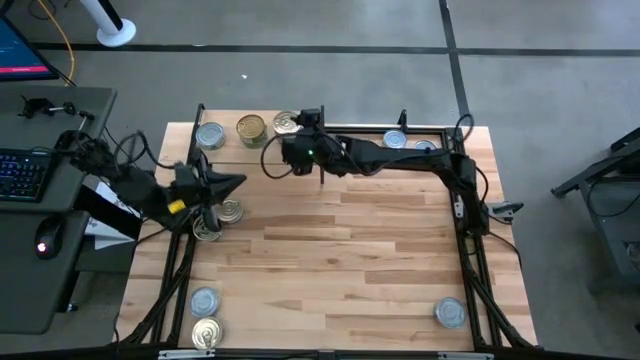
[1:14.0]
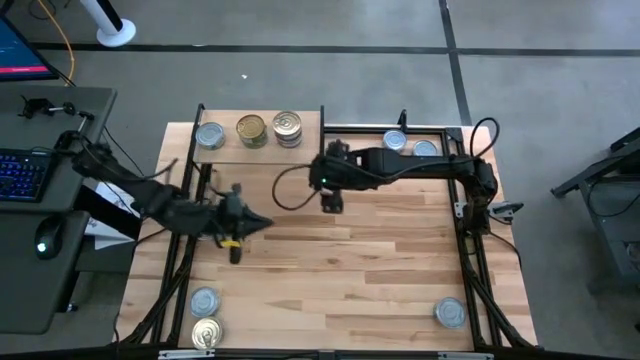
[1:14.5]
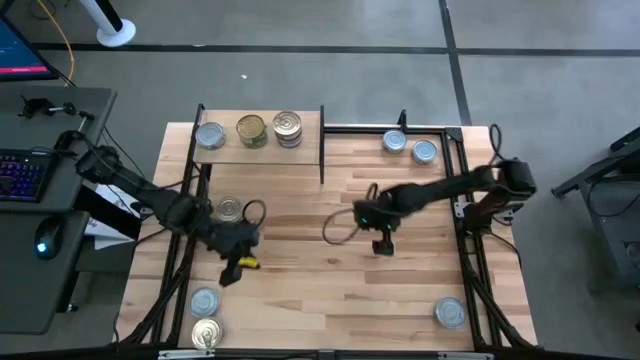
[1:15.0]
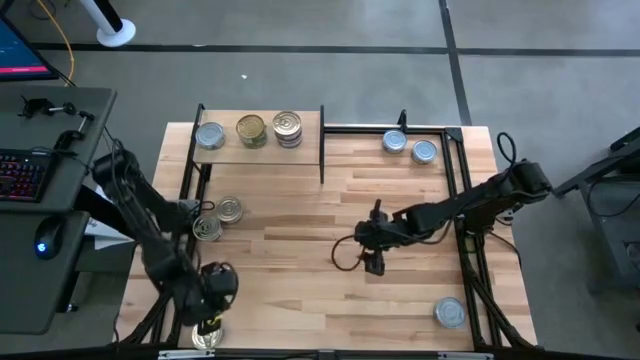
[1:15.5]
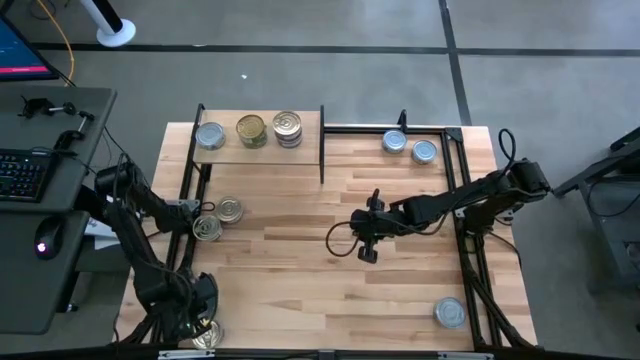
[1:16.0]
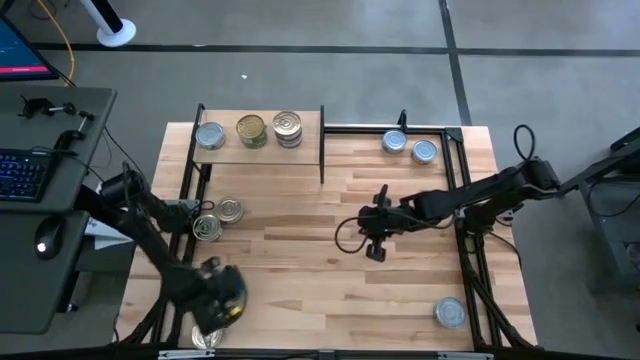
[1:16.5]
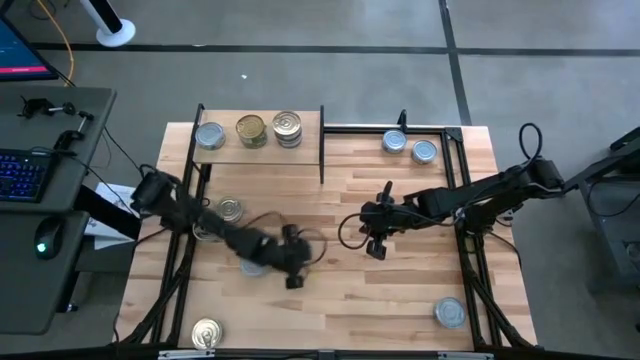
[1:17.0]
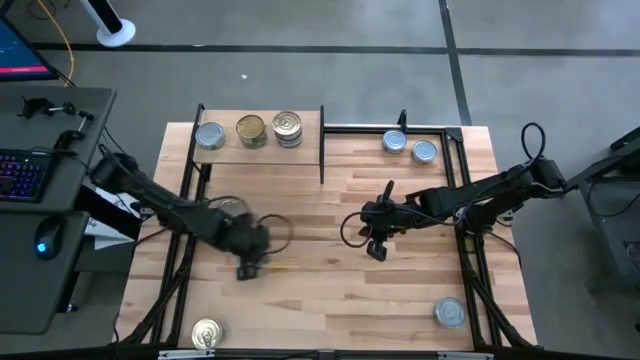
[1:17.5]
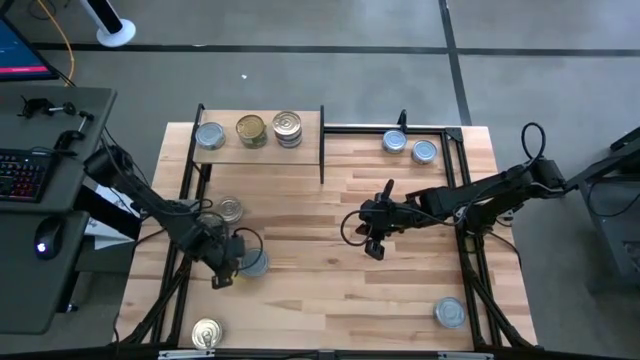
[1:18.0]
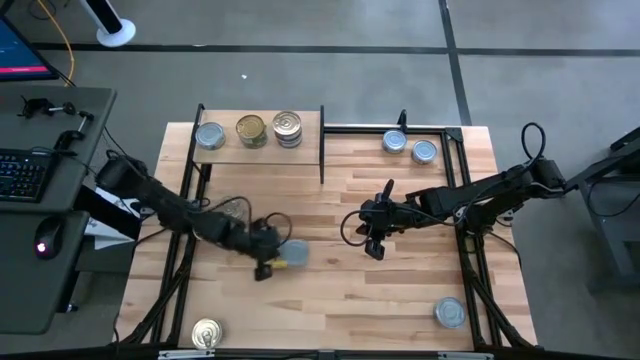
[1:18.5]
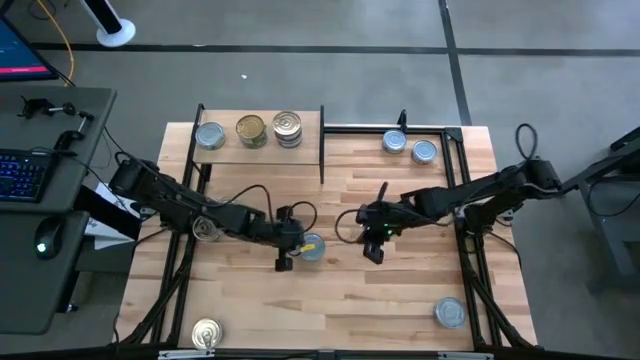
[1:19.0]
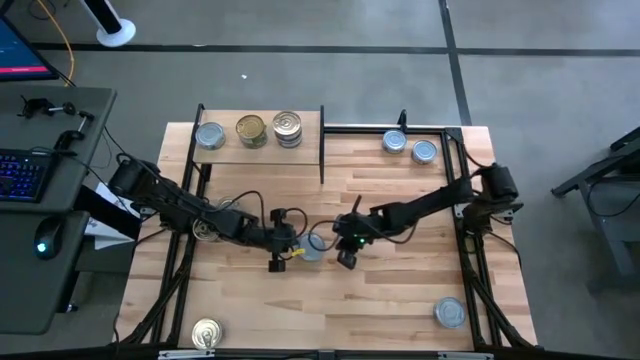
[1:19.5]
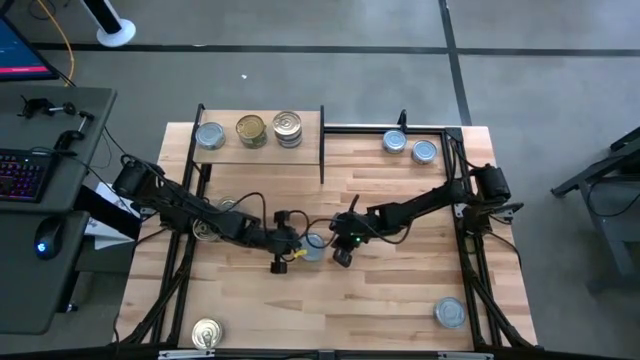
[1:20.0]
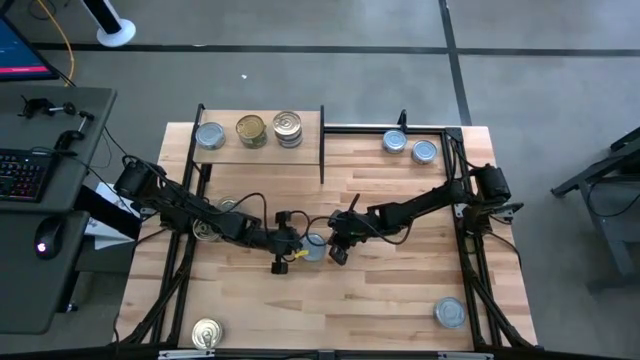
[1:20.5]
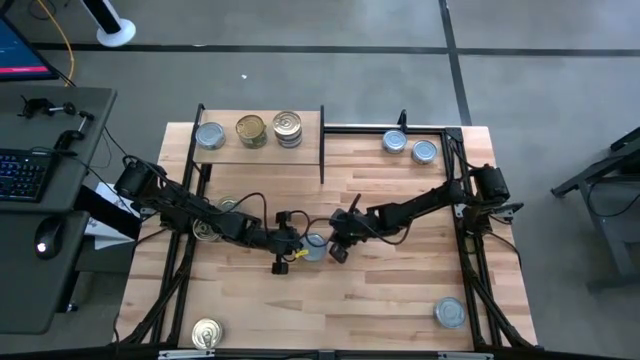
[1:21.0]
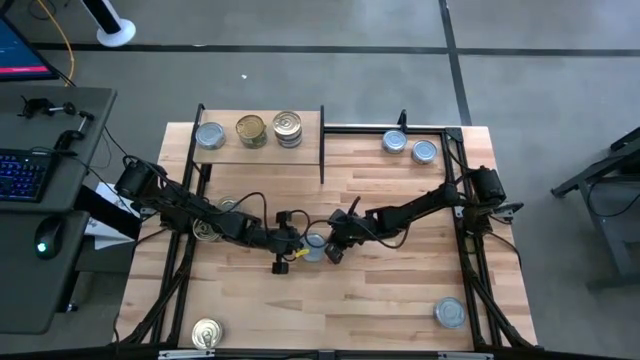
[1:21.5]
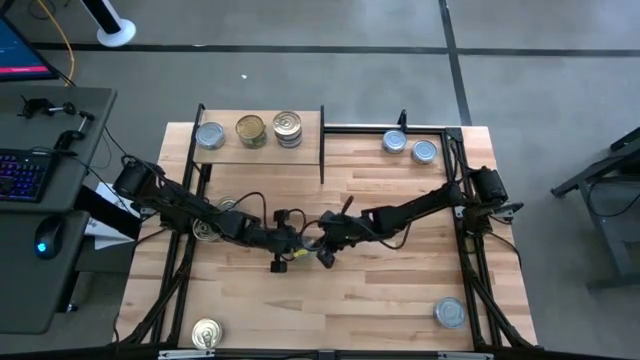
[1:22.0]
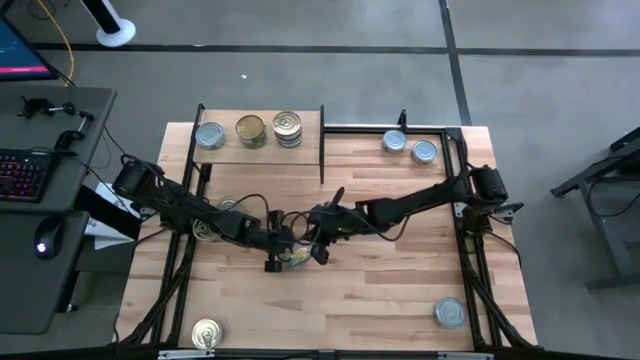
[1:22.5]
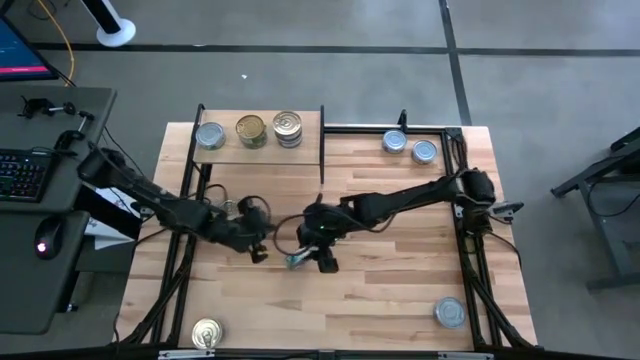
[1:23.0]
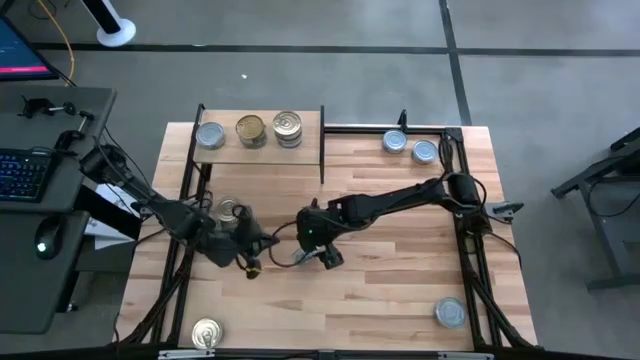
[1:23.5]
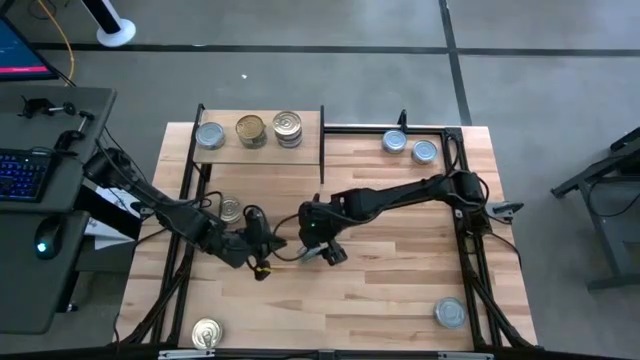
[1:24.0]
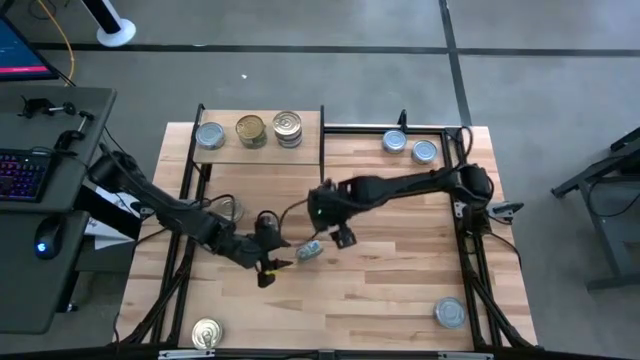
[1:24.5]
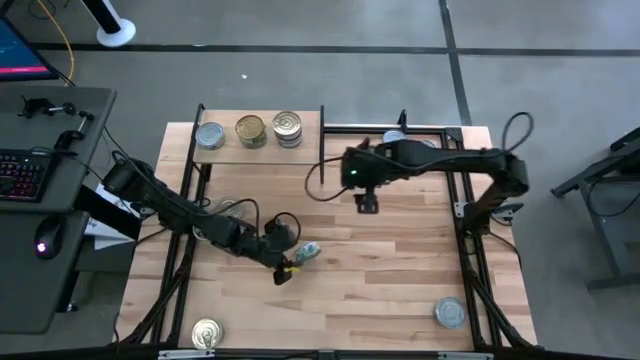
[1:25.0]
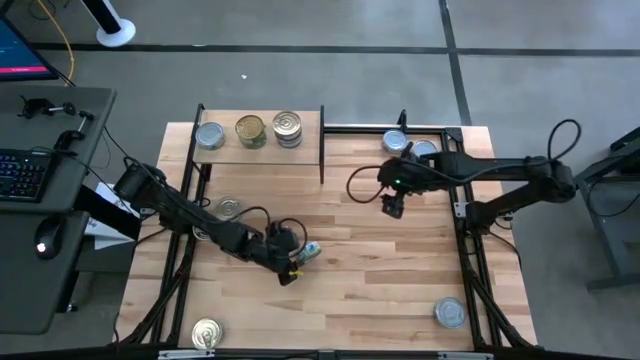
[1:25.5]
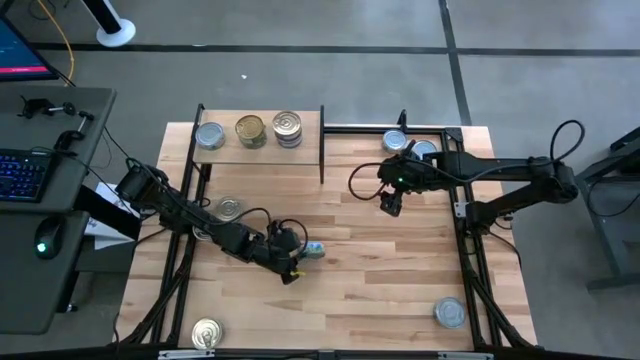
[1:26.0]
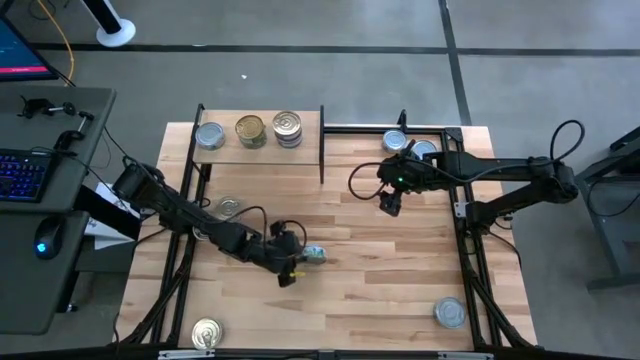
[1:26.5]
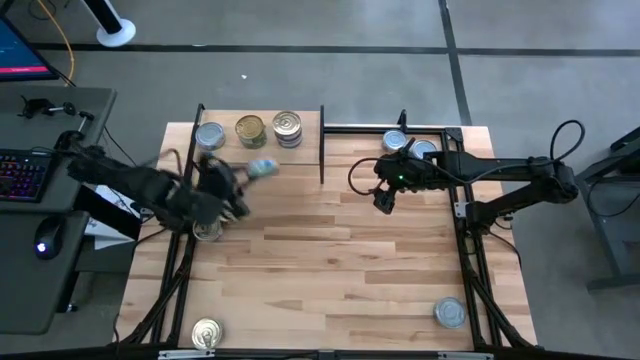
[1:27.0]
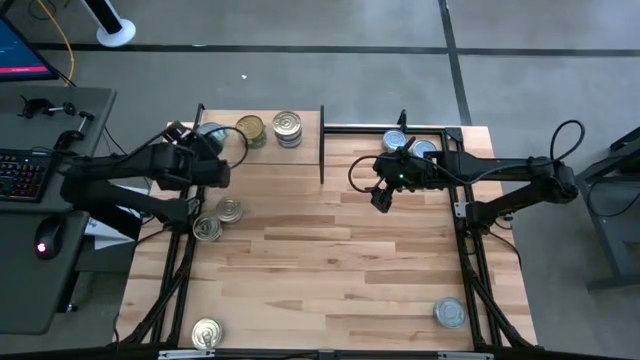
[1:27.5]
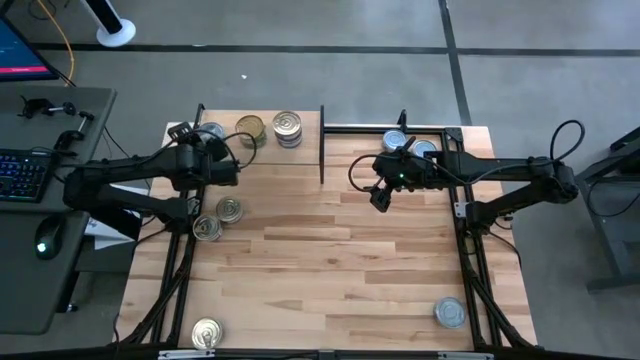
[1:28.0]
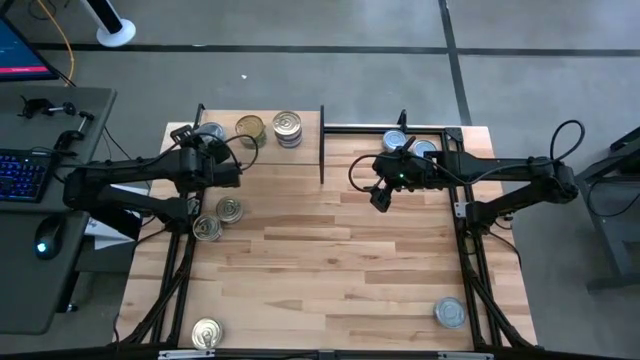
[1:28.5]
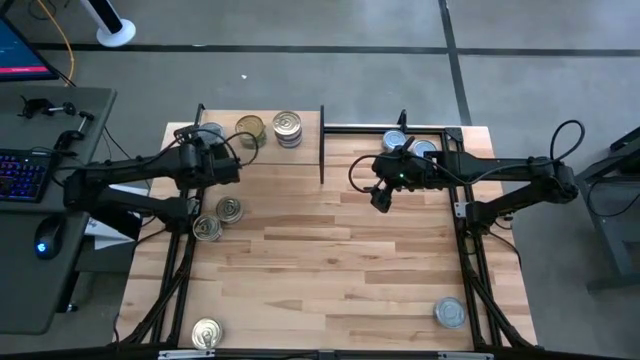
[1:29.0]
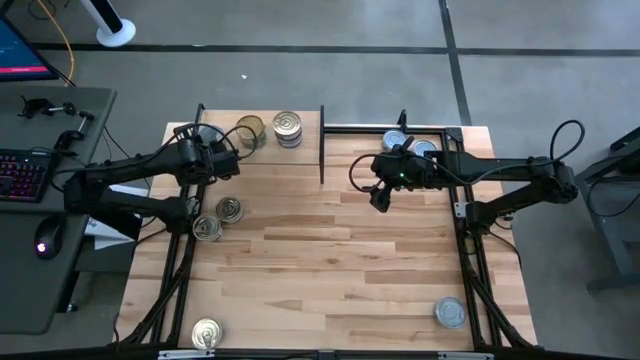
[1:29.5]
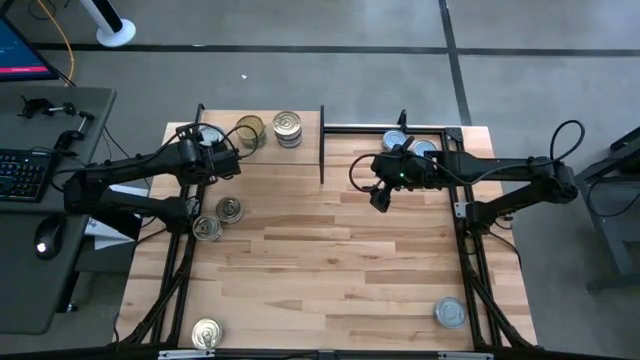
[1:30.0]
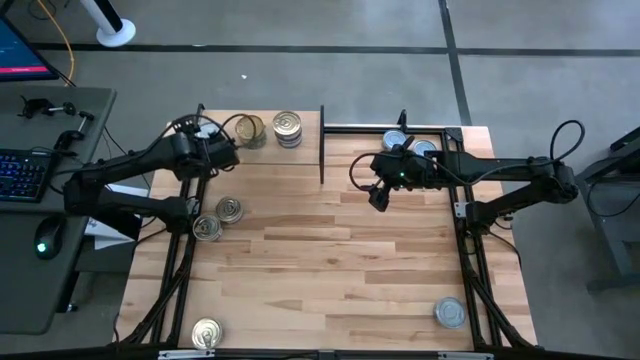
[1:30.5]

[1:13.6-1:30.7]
Task: Stack canned seafood by type on shelf
Stack the green-white tuna can on top of the green-white tuna can on the shelf

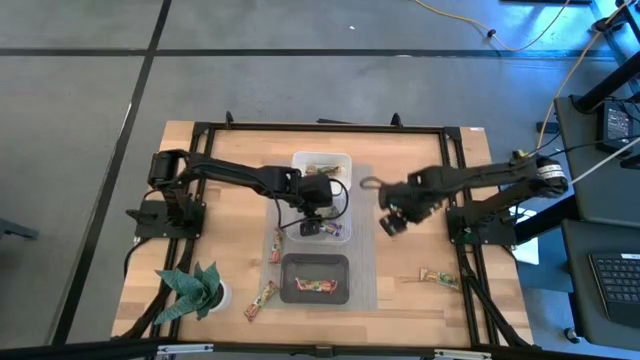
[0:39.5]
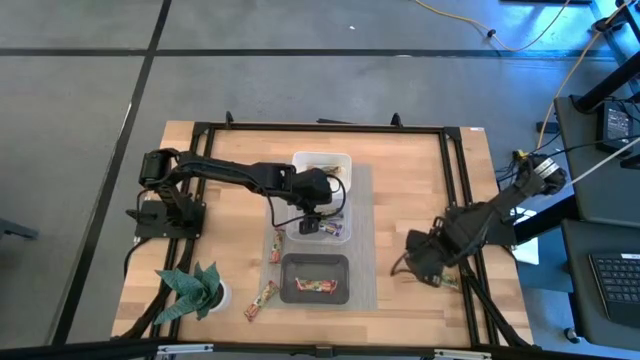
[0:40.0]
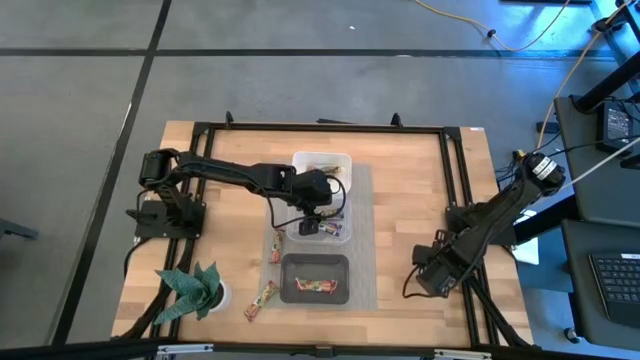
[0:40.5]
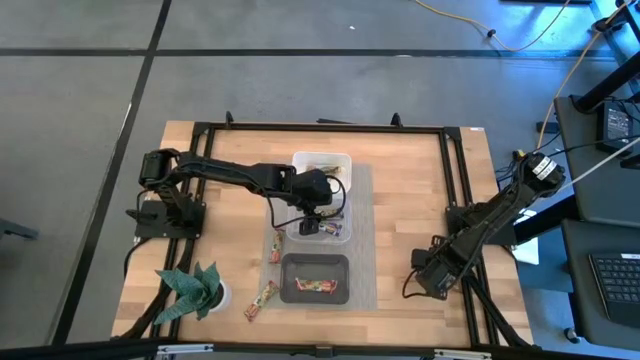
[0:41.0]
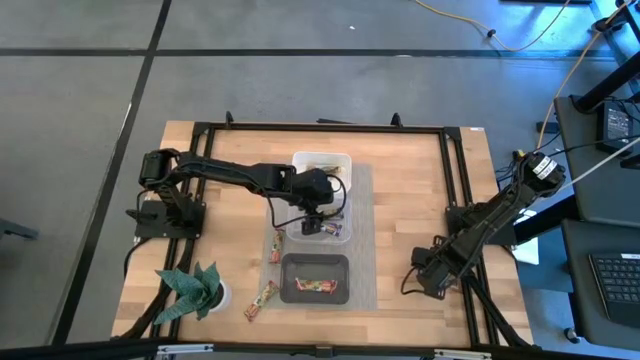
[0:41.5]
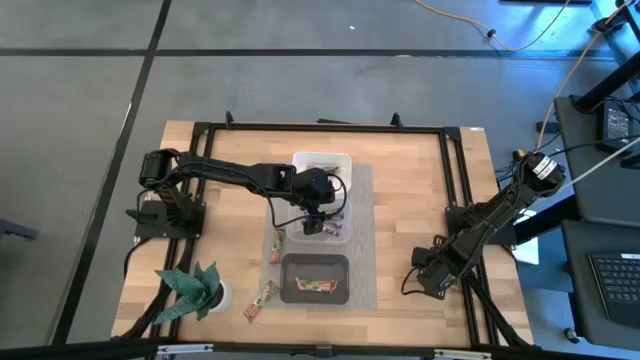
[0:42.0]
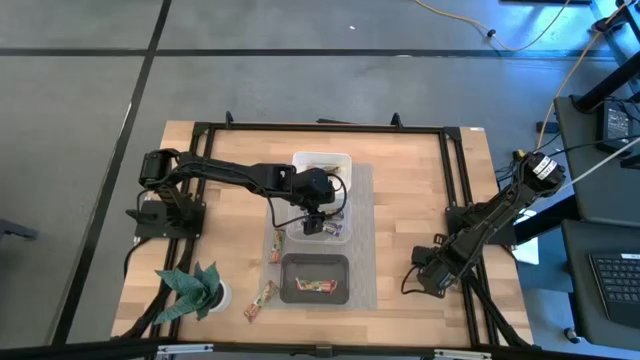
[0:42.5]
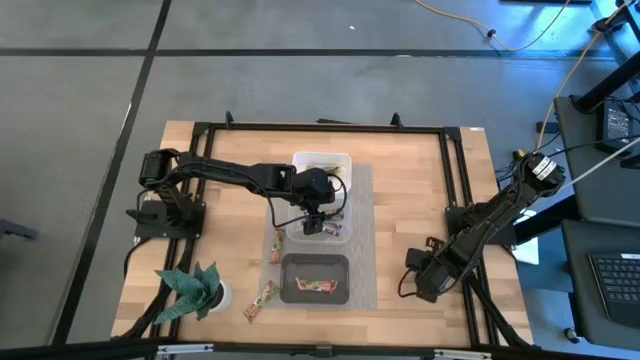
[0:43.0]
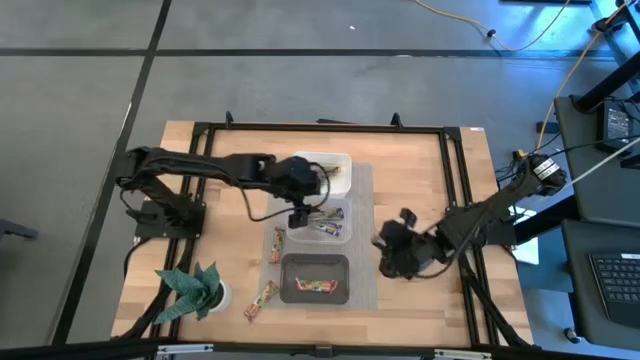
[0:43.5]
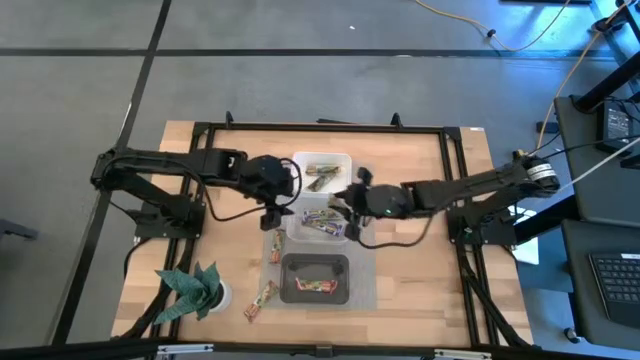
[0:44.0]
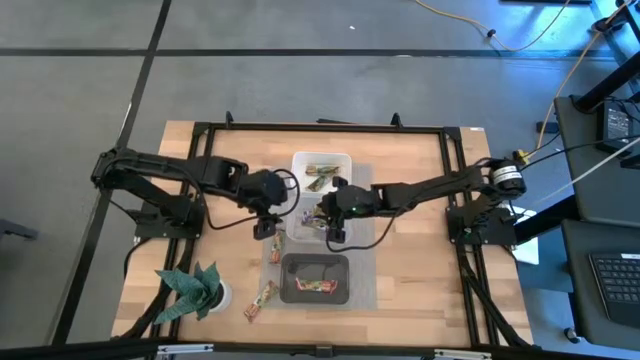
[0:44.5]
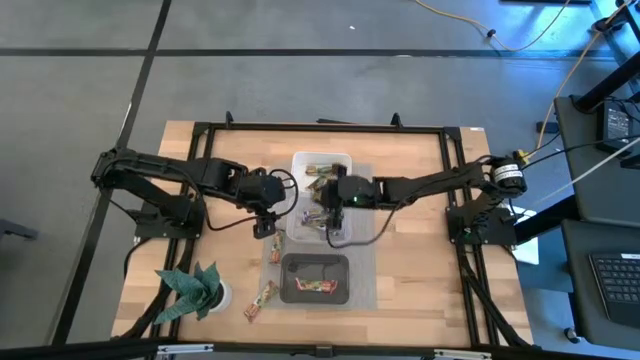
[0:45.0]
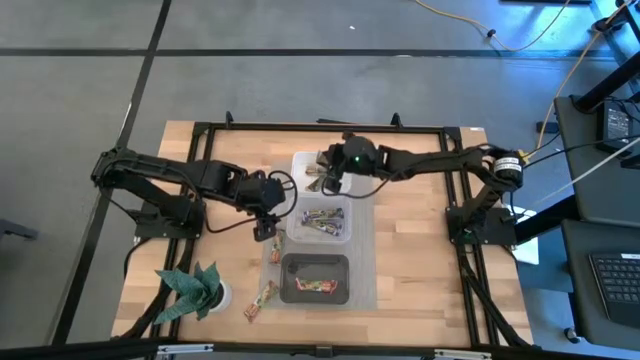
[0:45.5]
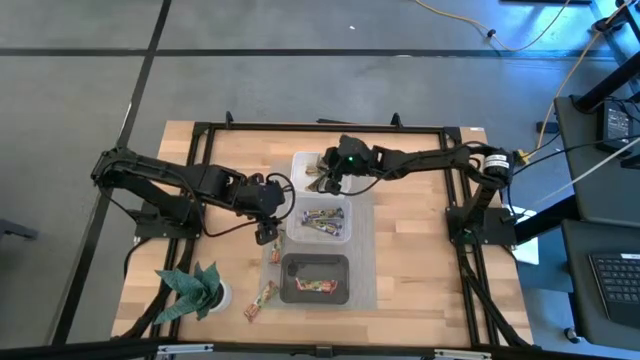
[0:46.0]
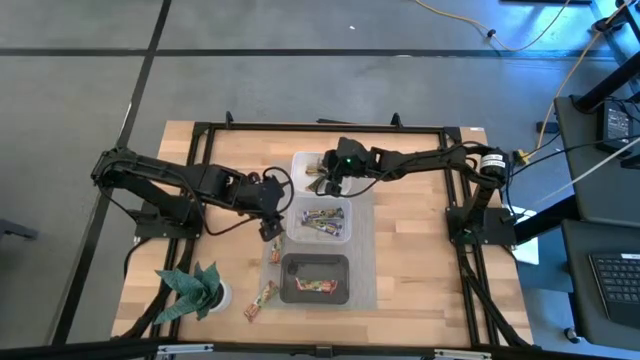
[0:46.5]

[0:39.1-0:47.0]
Task: Pick and place Granola Bars by type
Put the yellow granola bar into the white bin
